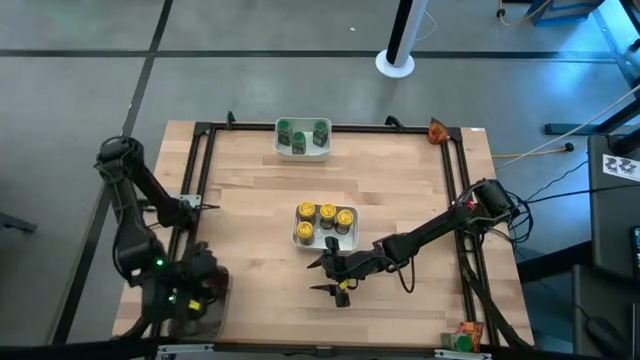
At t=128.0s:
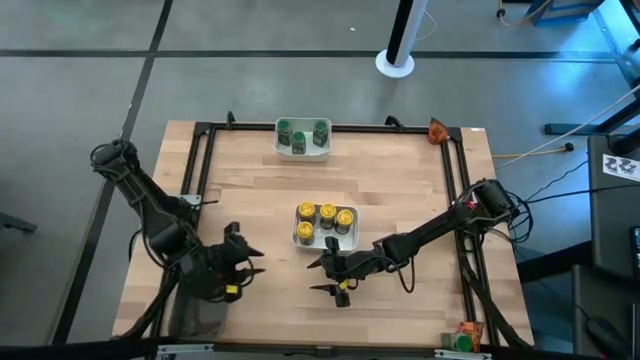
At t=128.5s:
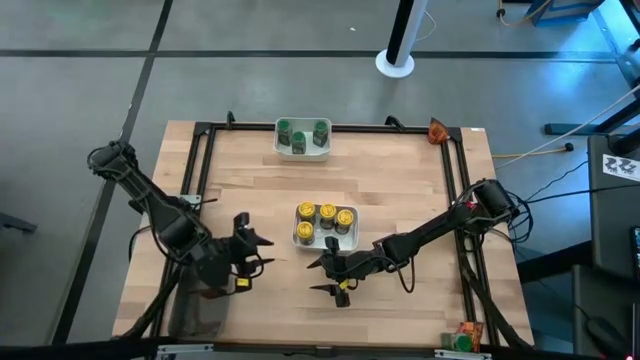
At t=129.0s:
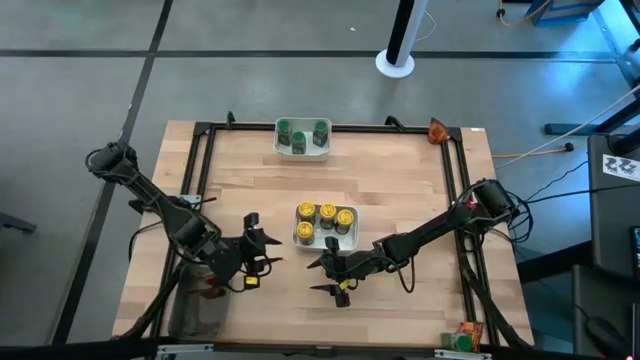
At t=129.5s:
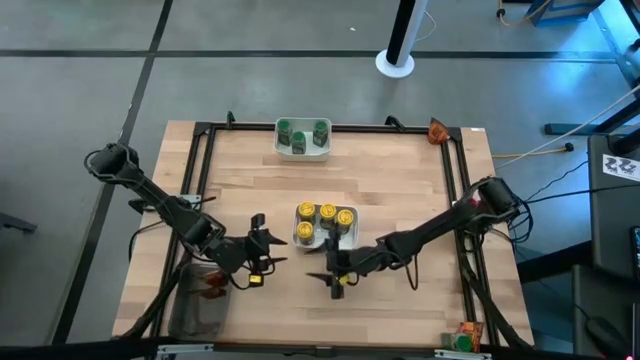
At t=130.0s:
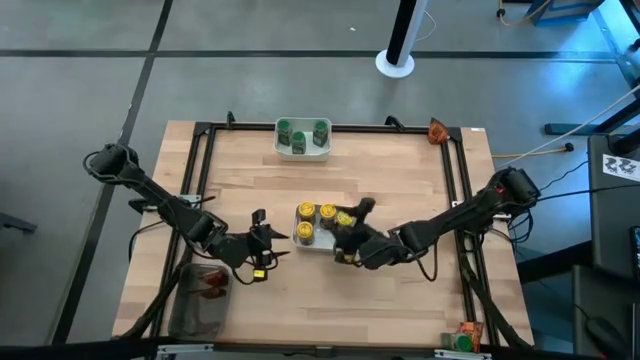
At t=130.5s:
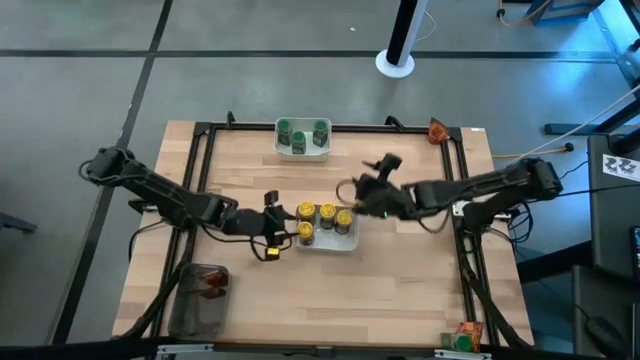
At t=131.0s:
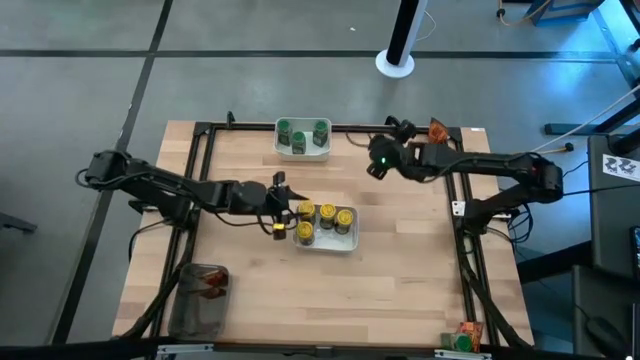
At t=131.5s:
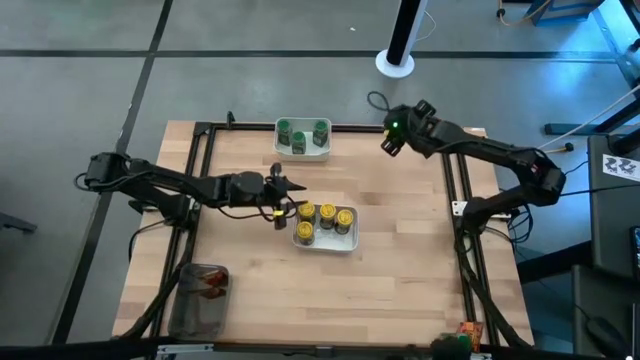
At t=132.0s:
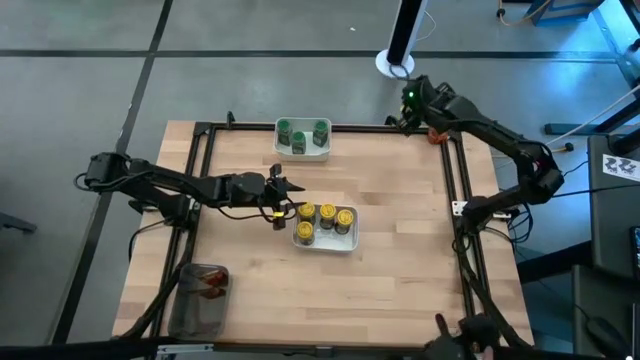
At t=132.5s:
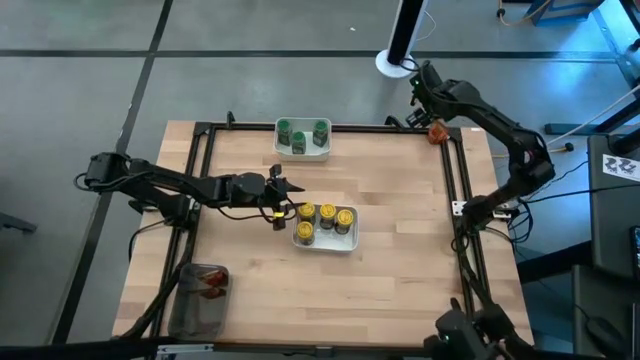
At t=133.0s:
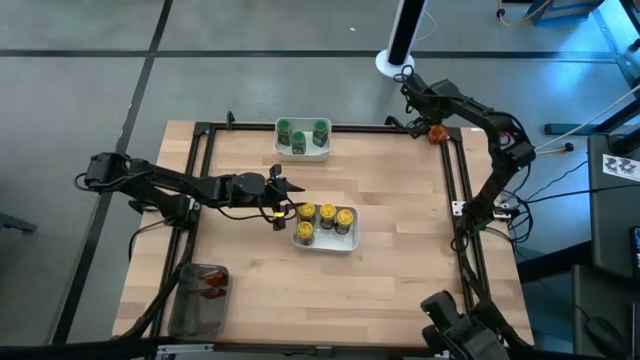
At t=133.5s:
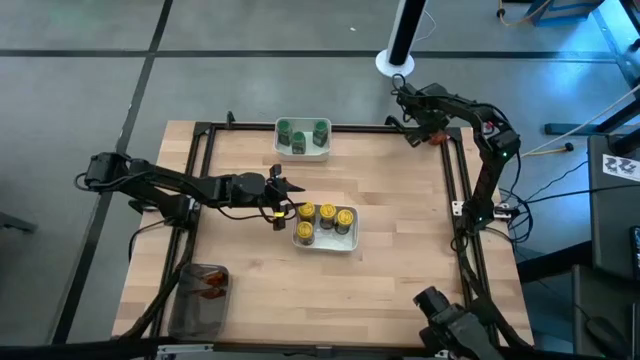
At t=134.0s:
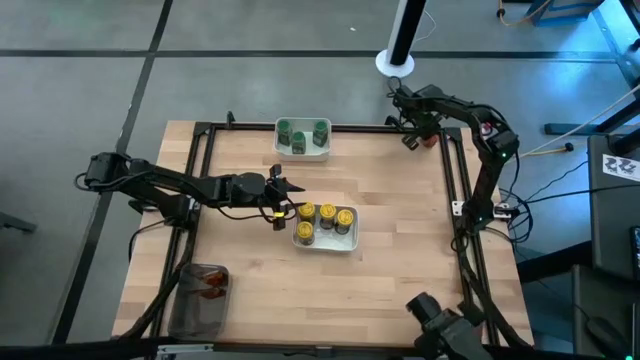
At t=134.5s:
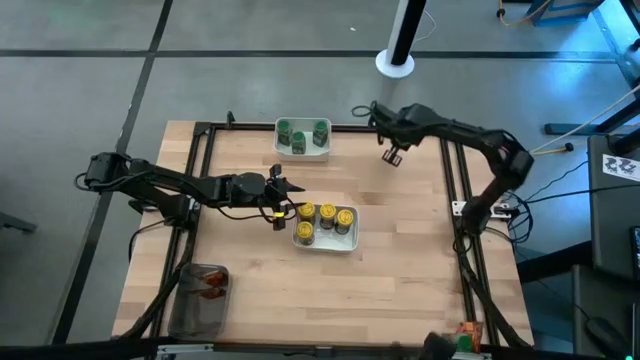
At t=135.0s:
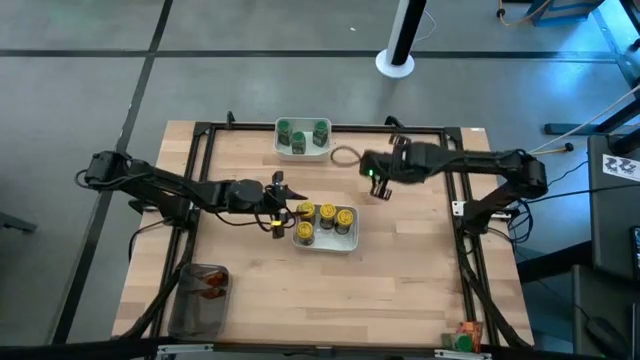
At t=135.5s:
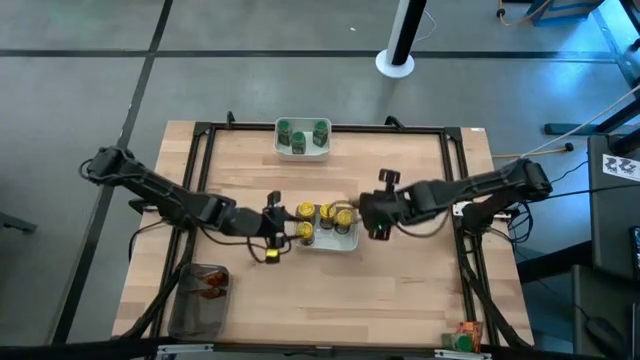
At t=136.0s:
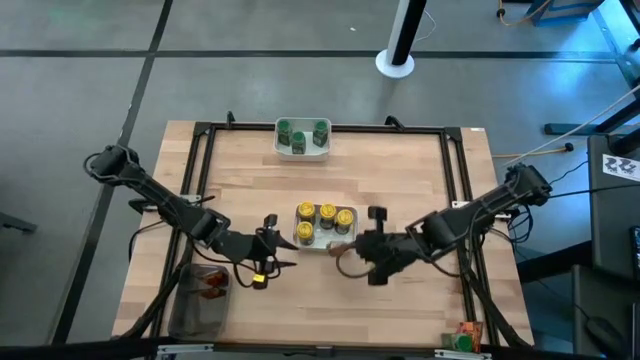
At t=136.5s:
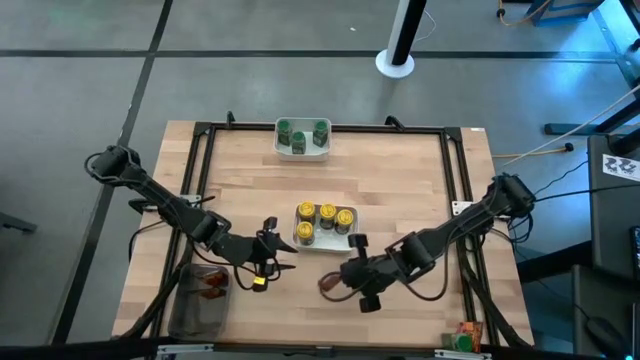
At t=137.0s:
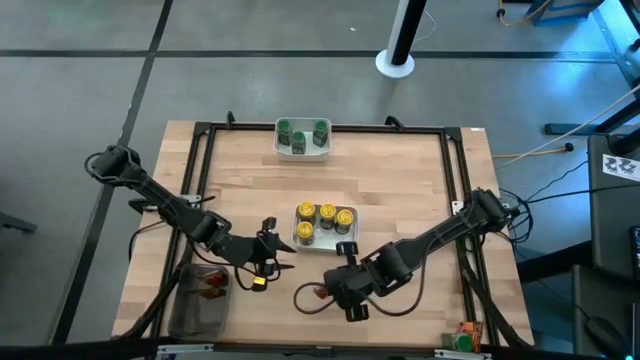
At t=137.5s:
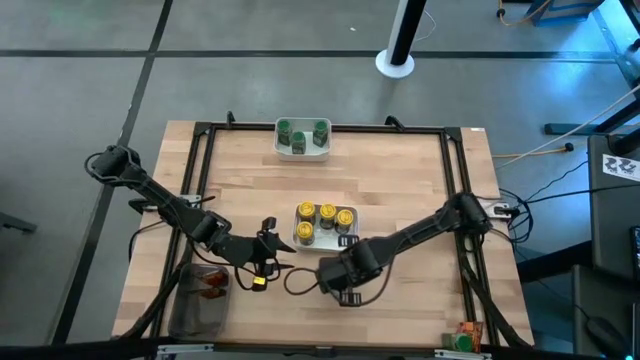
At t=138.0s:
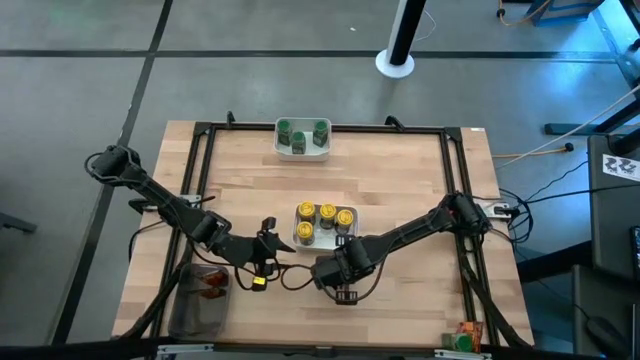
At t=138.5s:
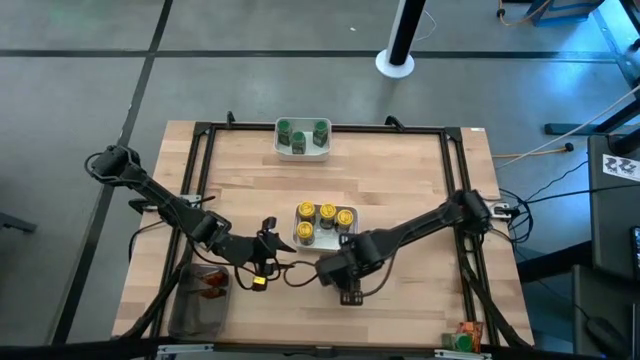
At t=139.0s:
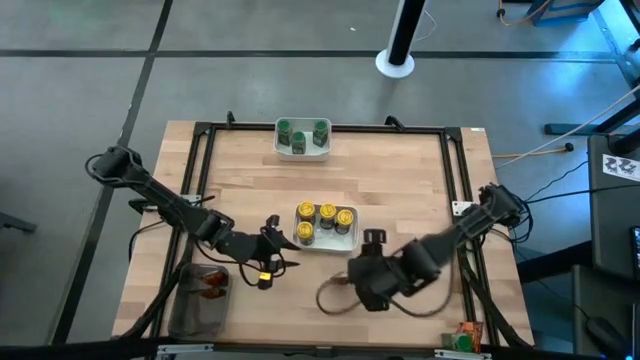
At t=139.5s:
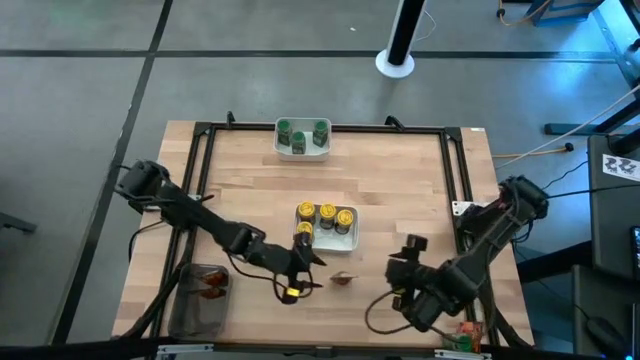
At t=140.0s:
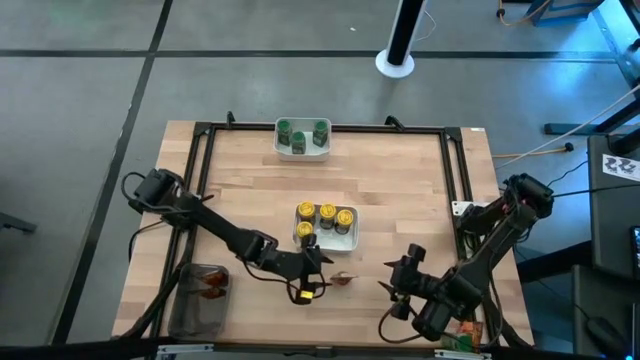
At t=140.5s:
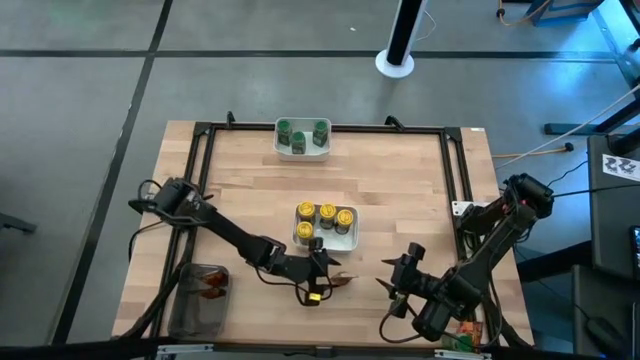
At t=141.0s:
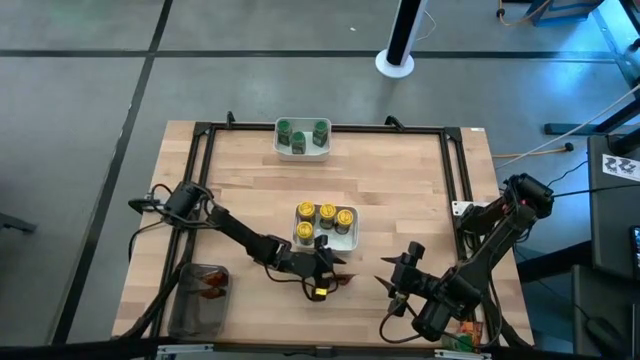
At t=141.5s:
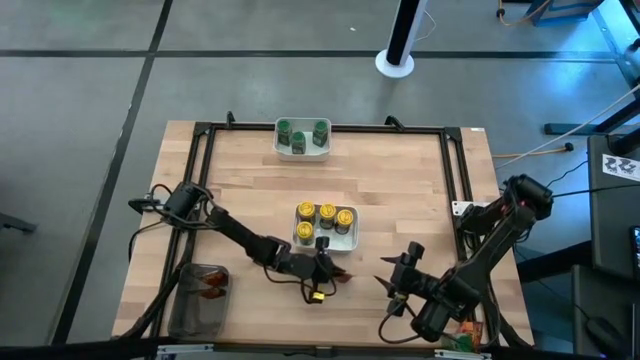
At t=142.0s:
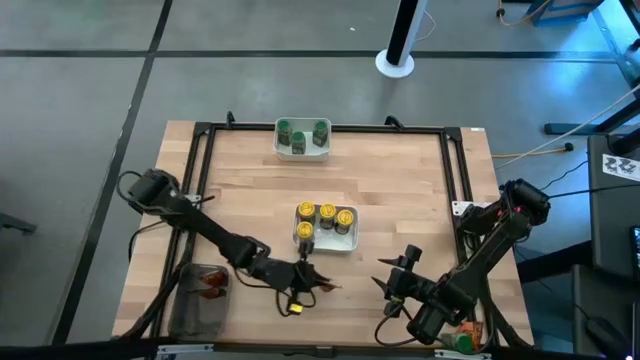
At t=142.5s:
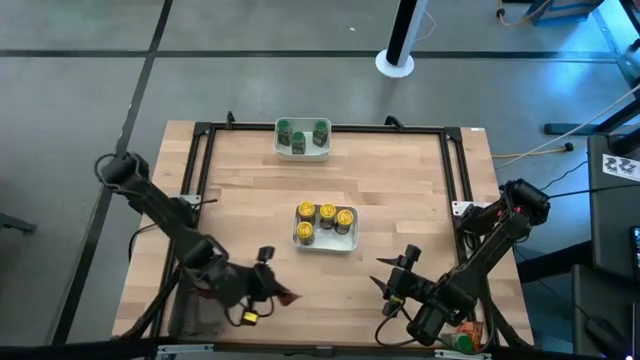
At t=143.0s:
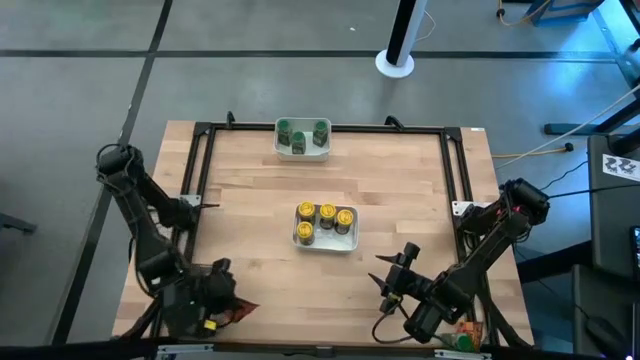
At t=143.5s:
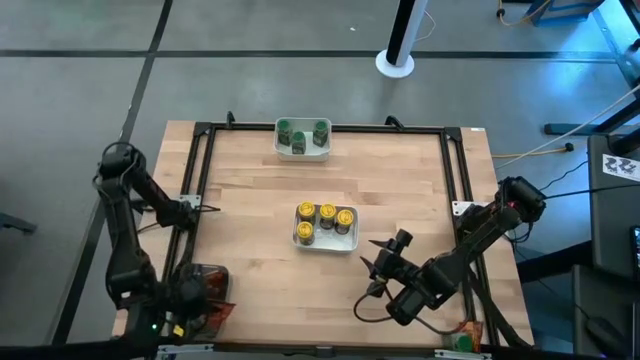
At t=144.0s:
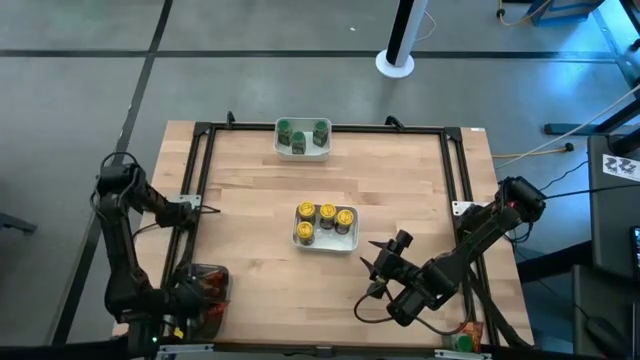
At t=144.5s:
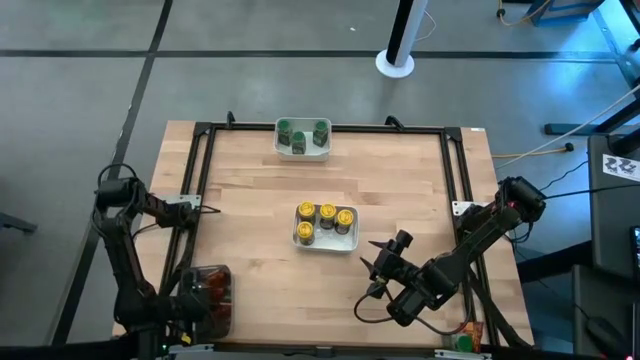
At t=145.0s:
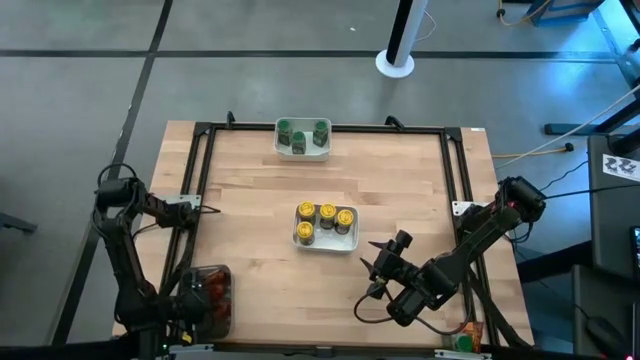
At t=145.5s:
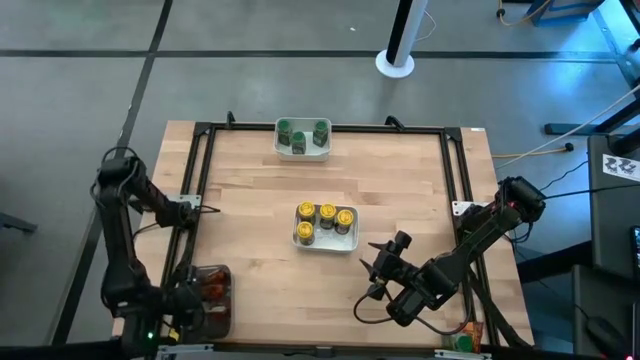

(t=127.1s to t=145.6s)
Task: Sort spices by type
Put the top orange seasoning pack into the black bin

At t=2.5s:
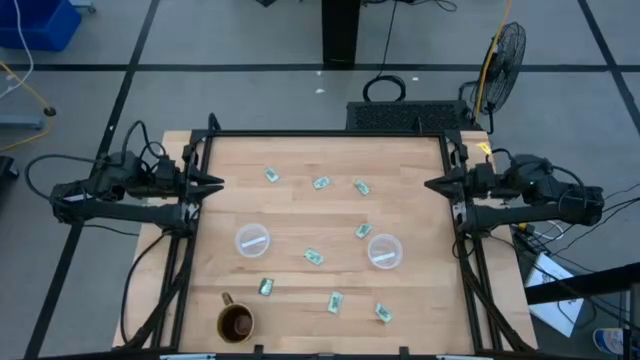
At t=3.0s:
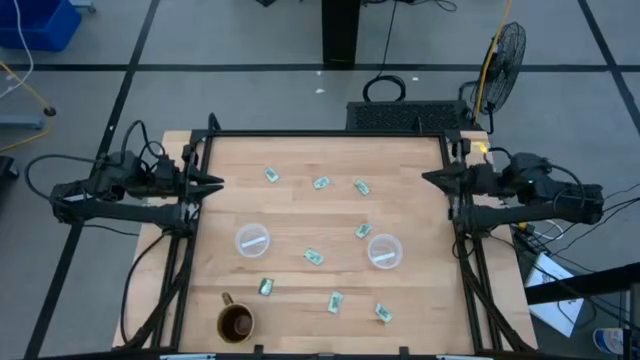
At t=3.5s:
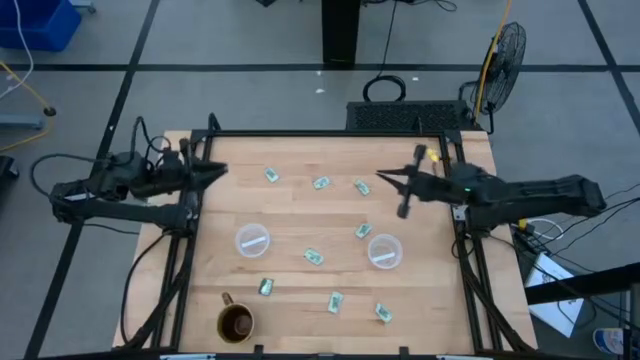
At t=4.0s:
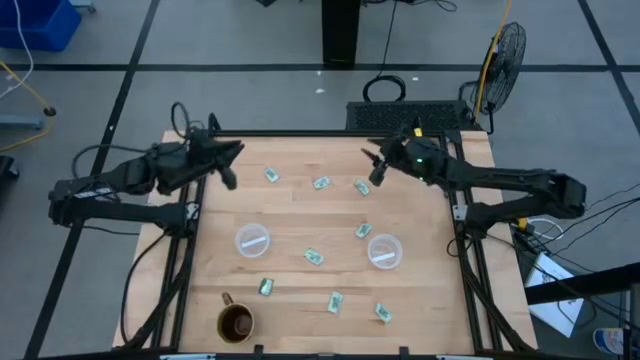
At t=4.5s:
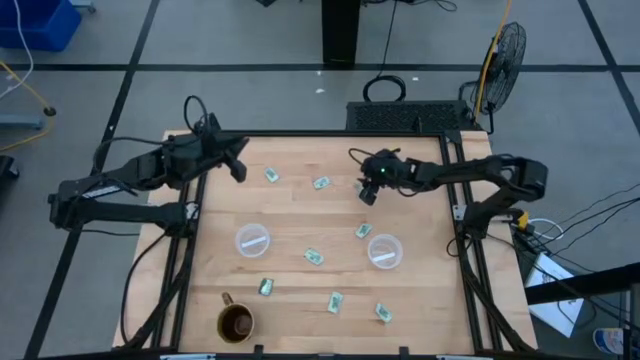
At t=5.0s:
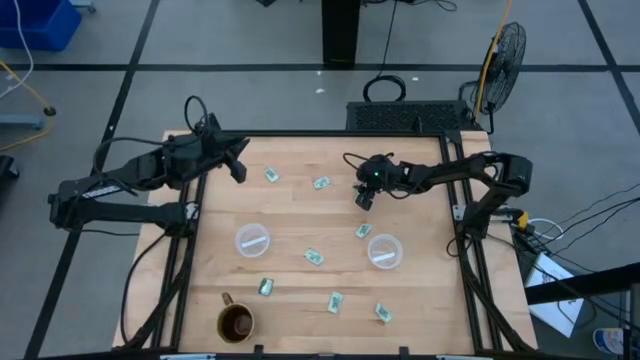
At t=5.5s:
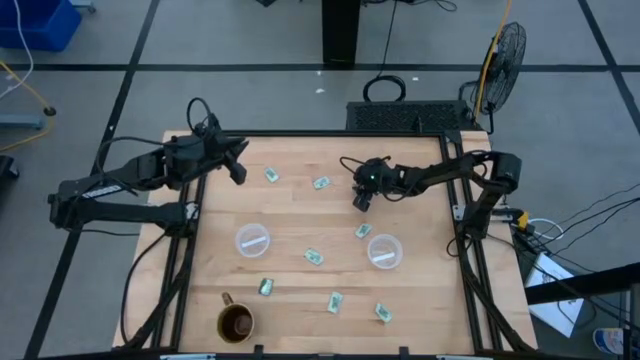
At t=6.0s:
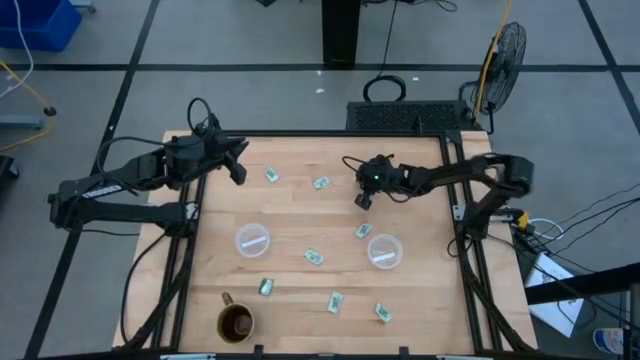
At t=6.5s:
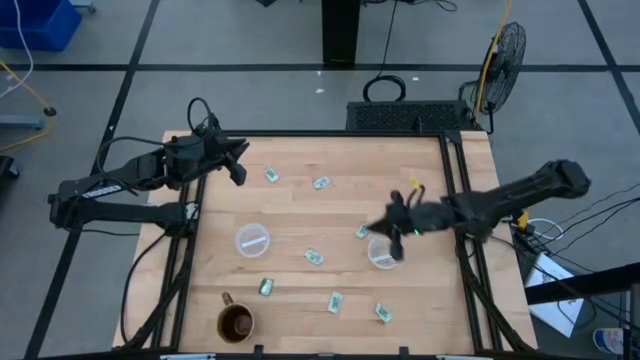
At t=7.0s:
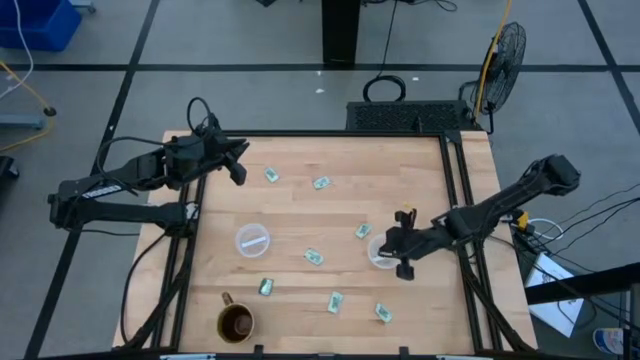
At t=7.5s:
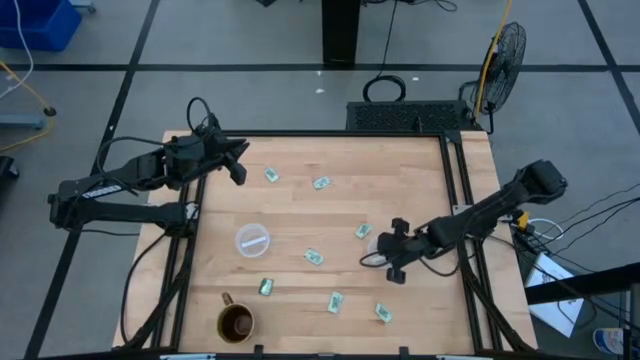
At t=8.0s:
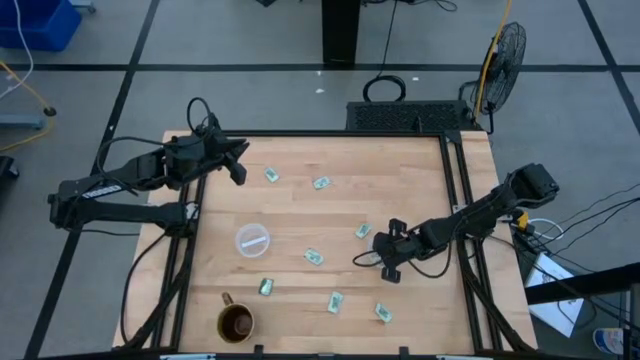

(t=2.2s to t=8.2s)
Task: Pick and place Stevia / Truvia into bins
Put the light green stevia packet into the right transparent container
